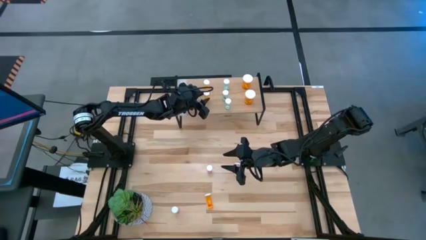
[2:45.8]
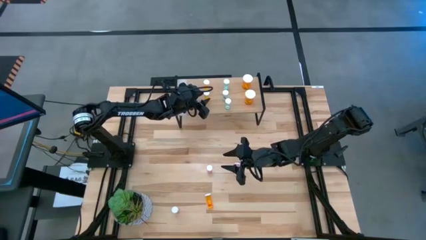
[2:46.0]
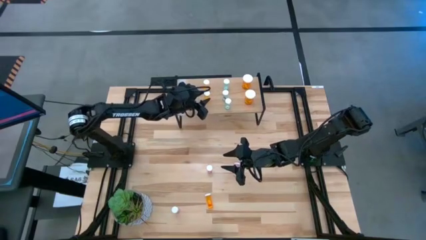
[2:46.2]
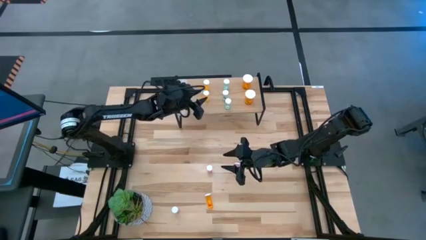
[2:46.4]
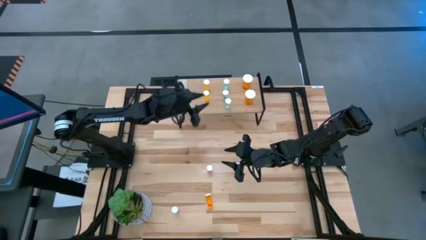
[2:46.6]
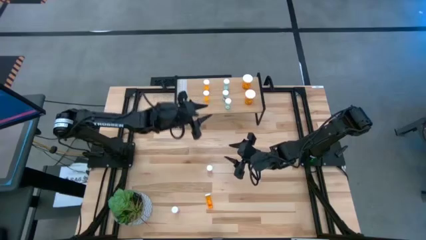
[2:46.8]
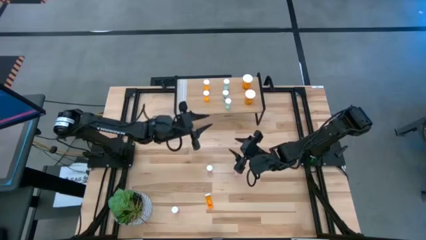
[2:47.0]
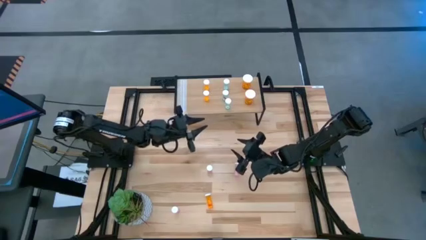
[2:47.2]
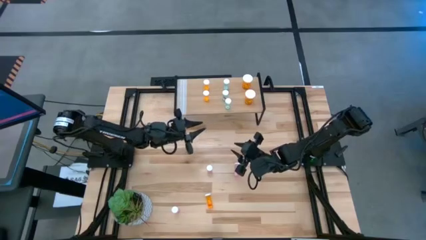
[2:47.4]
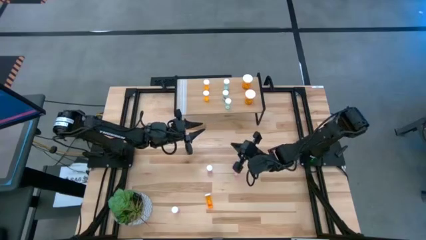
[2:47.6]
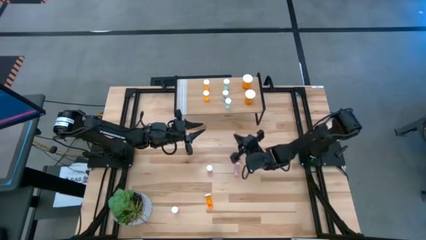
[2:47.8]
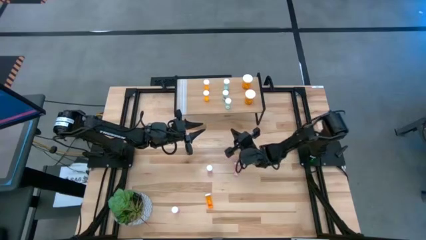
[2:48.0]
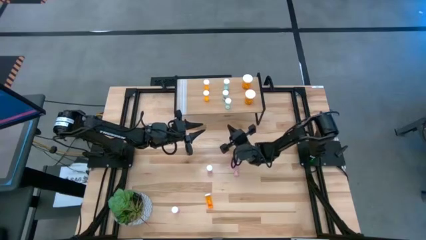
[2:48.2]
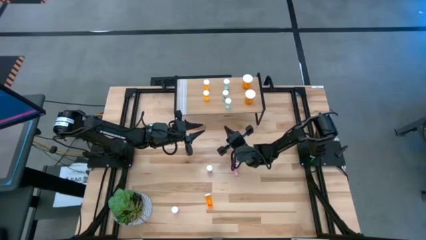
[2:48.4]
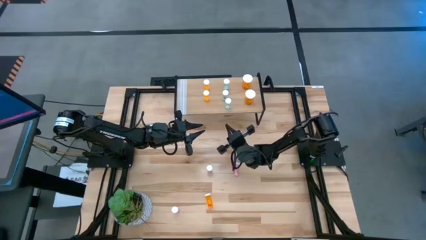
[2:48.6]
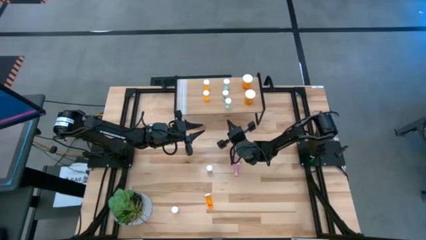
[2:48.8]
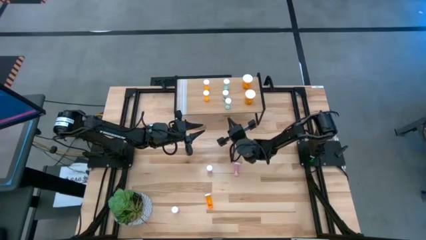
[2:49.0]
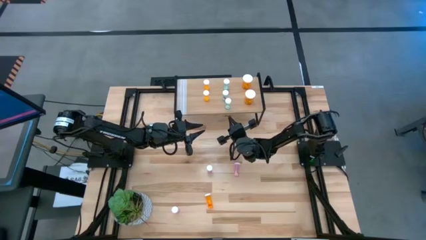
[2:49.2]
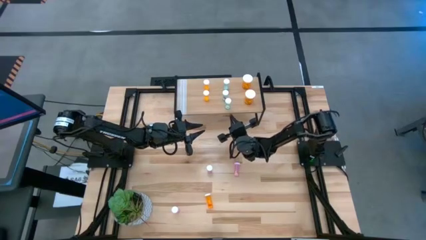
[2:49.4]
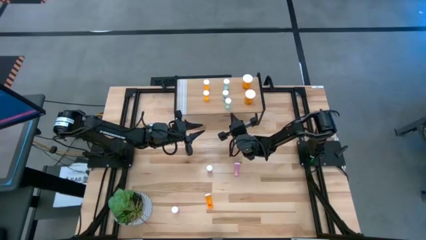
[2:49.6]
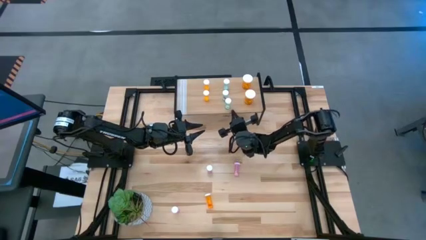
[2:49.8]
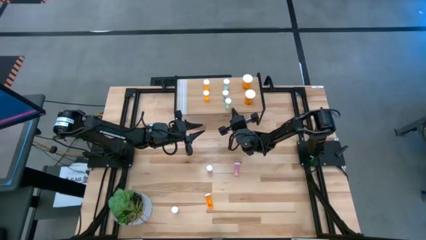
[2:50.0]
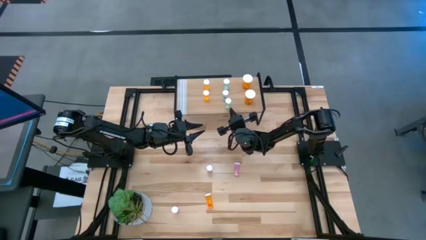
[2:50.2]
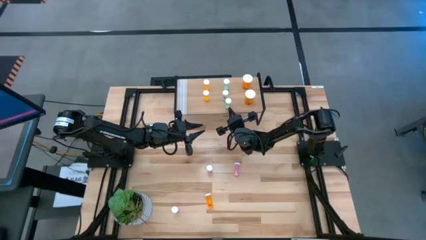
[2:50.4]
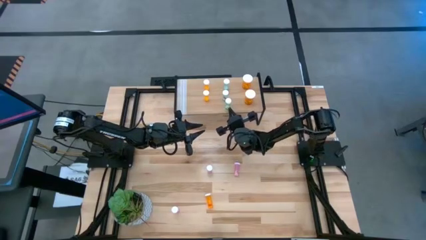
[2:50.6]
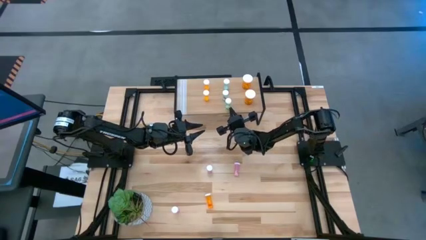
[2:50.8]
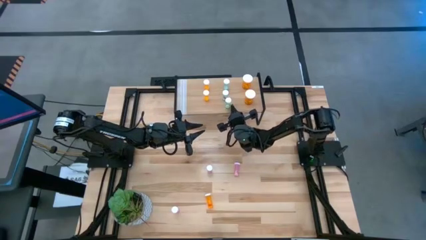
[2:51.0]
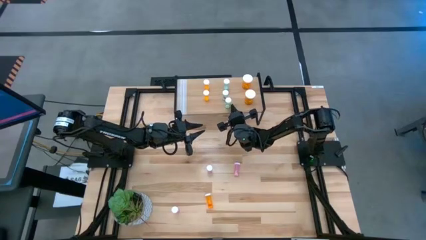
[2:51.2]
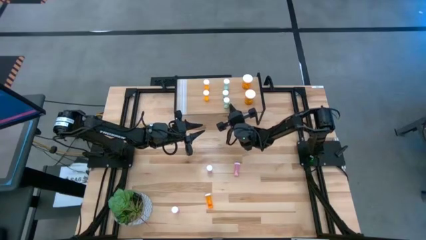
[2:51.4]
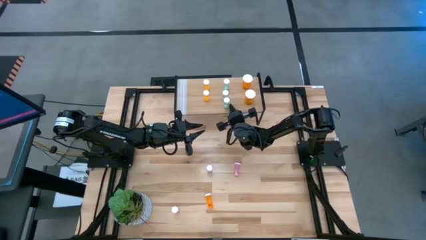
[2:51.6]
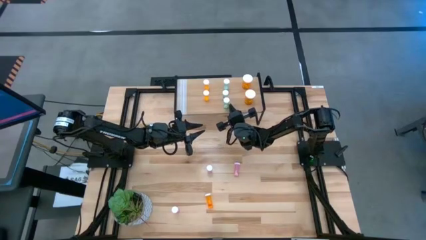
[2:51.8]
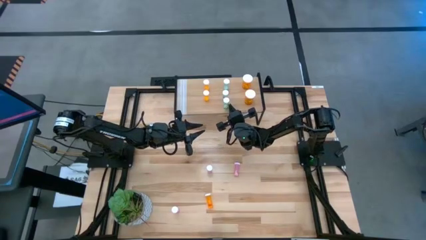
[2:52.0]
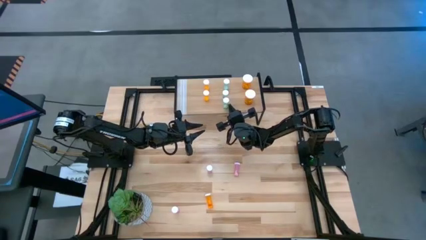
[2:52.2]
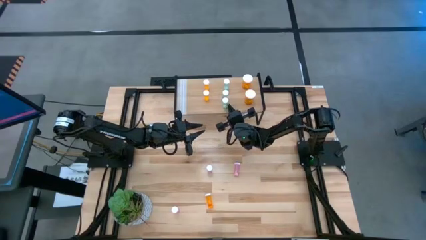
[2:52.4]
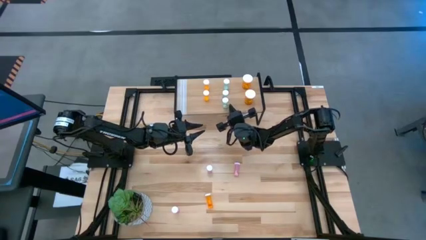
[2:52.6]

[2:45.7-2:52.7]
Task: Pick and place medicine bottles onto shelf by color
Adjust the small blue pill bottle on the shelf

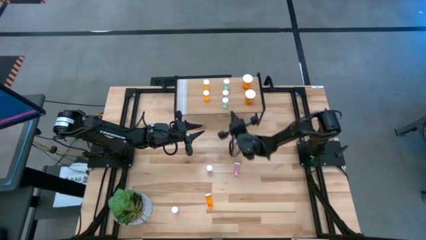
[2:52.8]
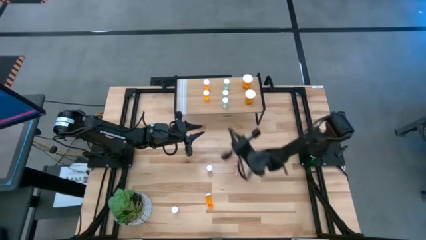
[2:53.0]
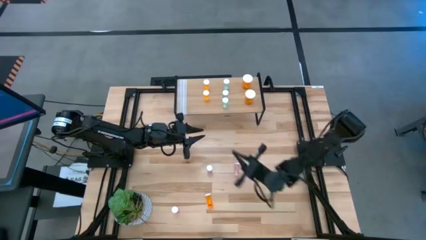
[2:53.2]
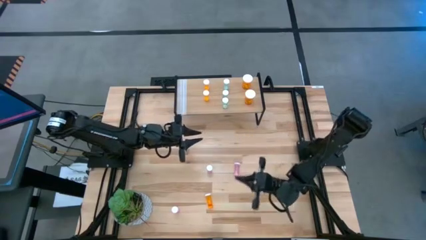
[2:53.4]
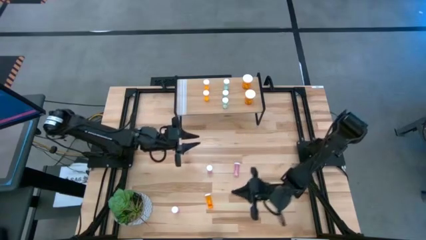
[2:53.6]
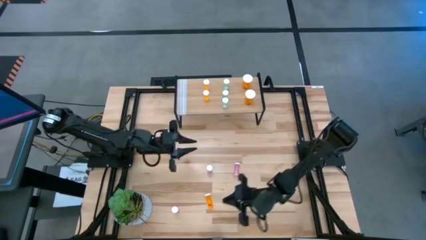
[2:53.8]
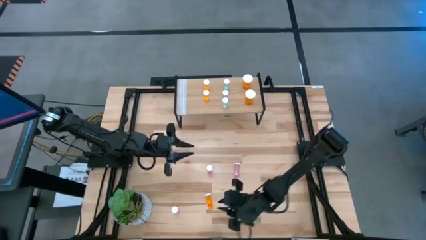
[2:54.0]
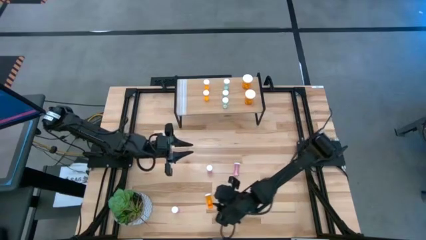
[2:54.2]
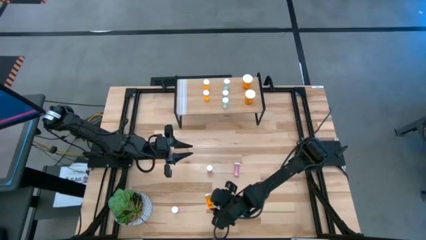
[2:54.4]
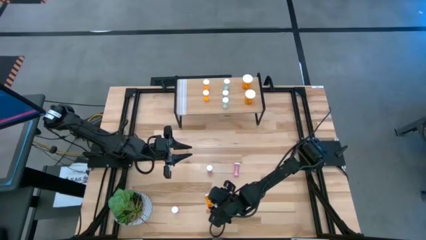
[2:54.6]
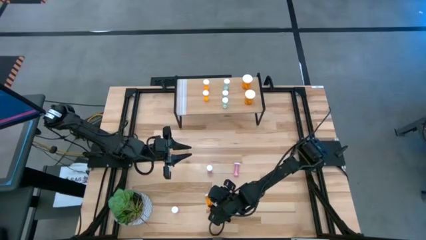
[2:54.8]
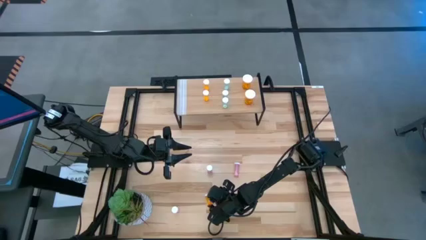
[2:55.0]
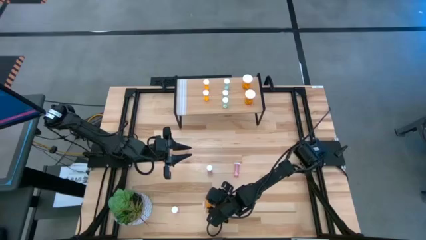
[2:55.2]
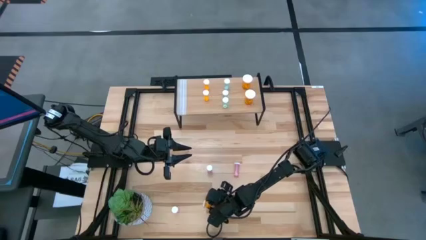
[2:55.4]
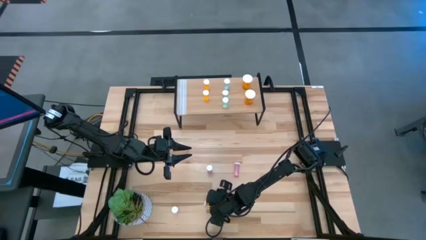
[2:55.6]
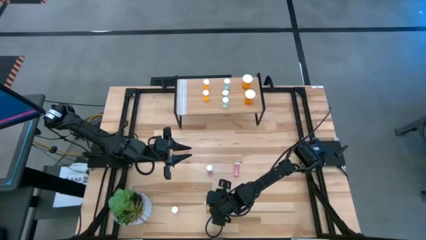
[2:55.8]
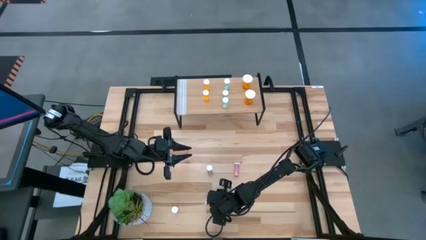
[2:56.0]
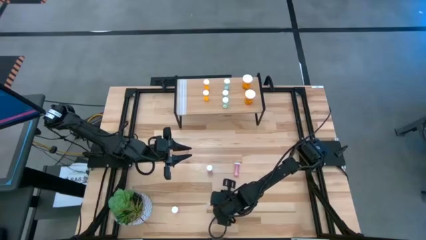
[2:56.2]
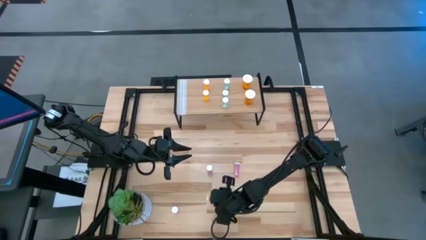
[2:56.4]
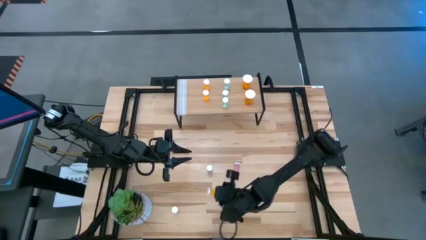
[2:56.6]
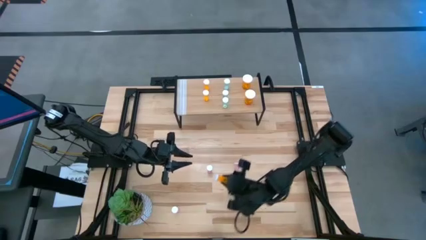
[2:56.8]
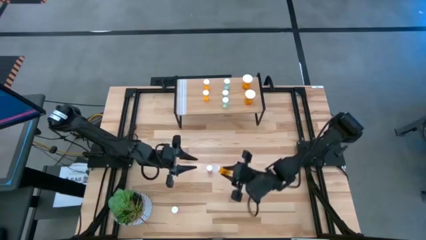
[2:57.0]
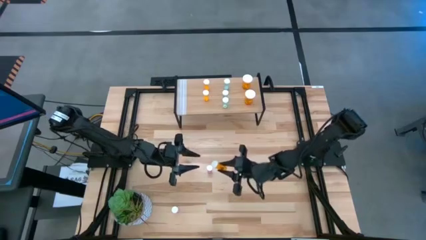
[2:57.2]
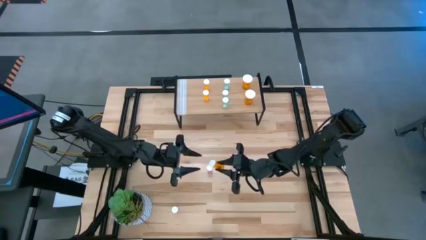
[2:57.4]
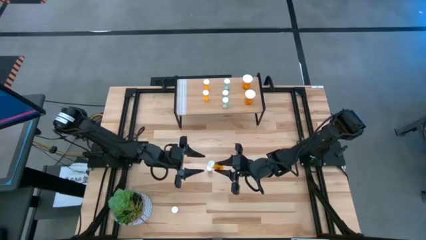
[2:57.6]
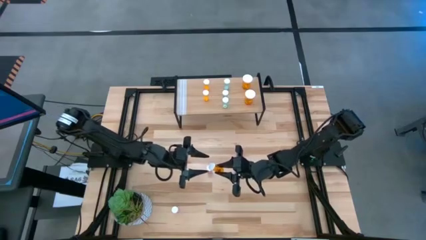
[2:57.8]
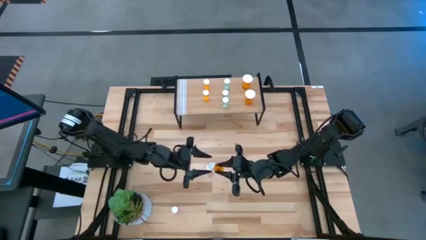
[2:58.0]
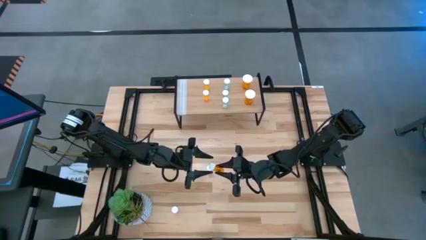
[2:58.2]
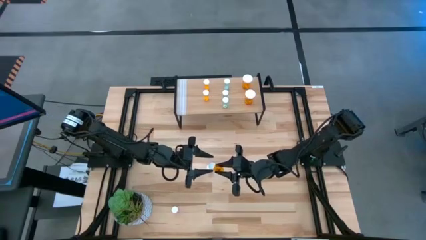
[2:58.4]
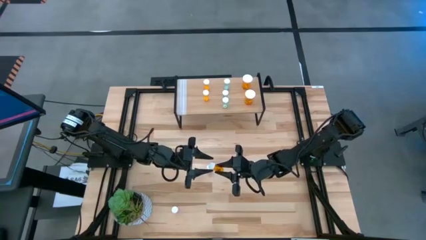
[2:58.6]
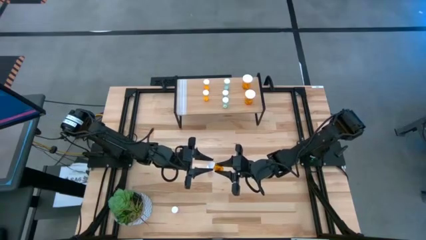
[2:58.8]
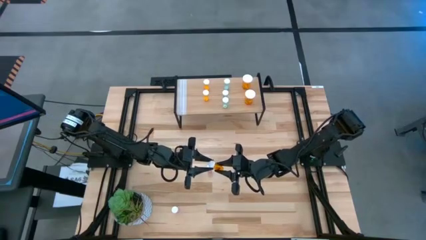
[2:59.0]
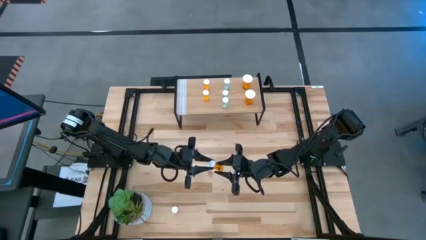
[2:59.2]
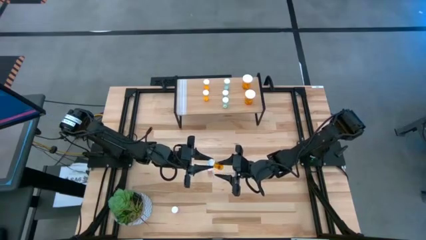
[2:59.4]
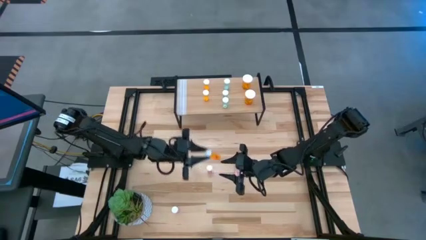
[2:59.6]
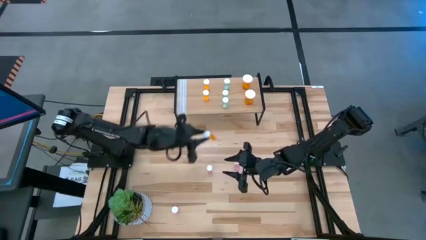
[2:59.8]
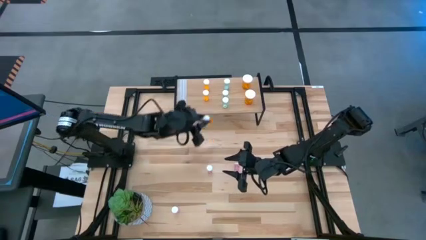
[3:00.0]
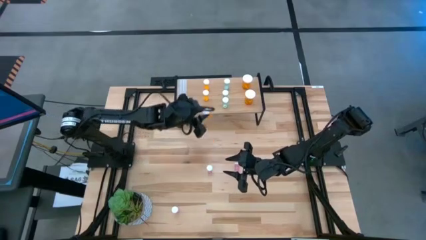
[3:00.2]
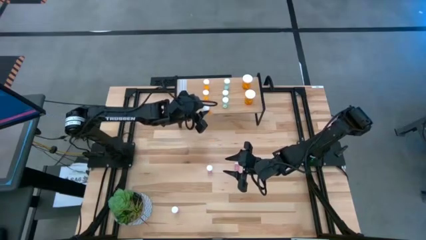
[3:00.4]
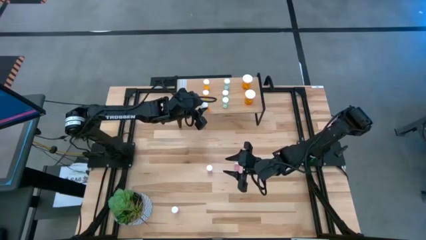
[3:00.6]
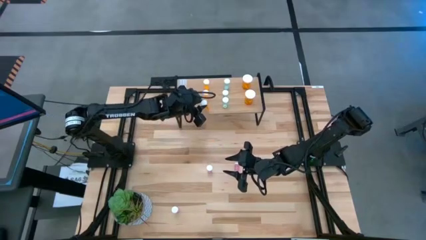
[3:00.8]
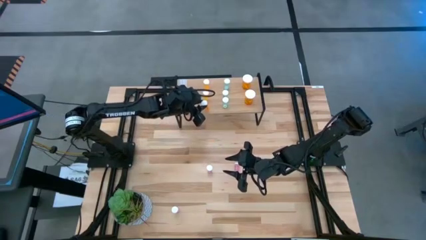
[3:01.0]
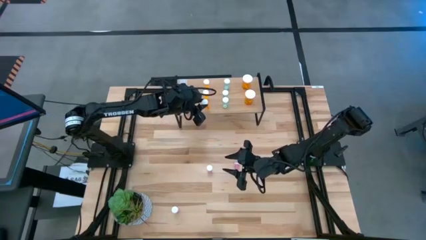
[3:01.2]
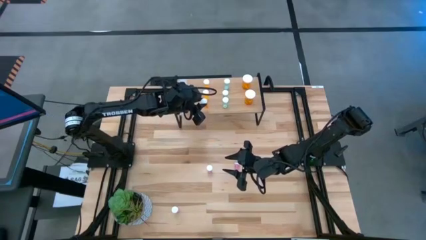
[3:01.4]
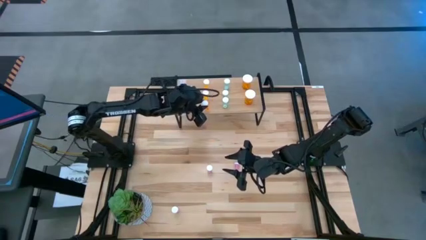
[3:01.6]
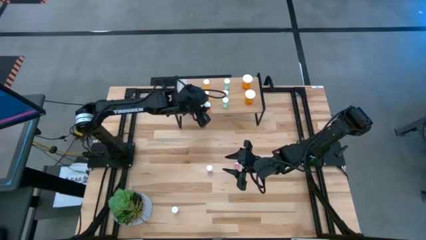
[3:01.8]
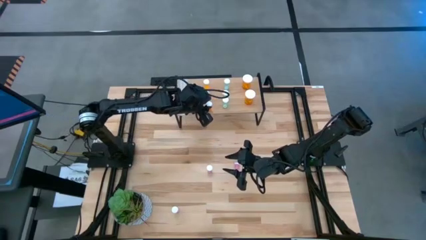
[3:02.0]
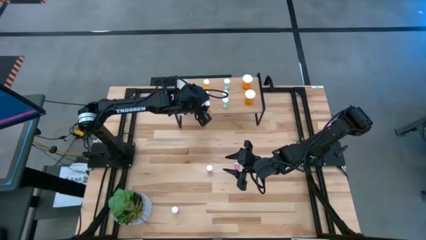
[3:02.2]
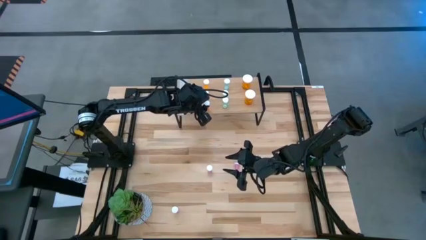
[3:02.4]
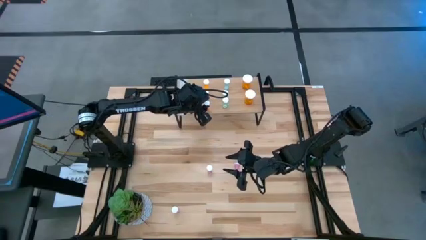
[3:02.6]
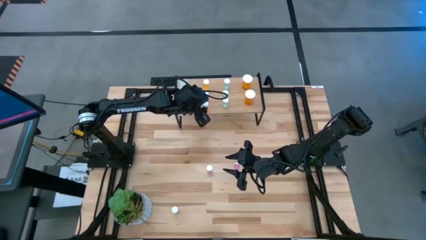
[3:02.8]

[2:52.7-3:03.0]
Put the small orange pill bottle on the shelf aligned with the other small orange pill bottles
